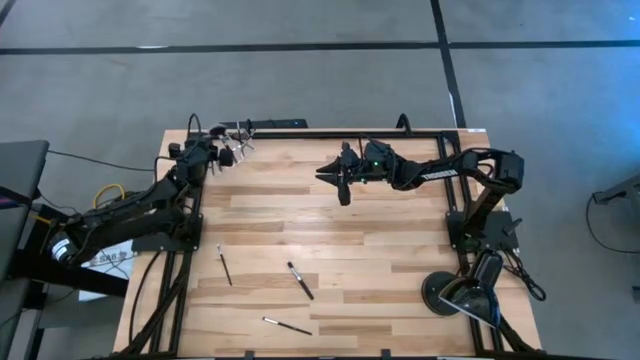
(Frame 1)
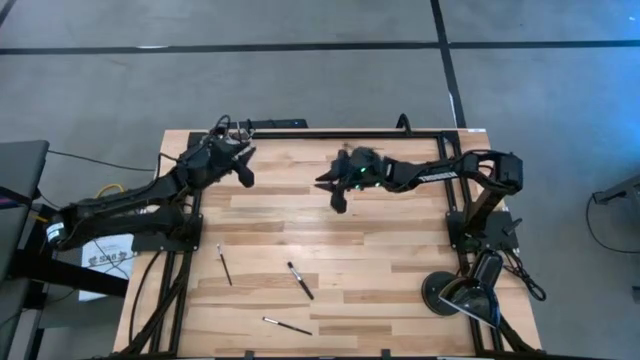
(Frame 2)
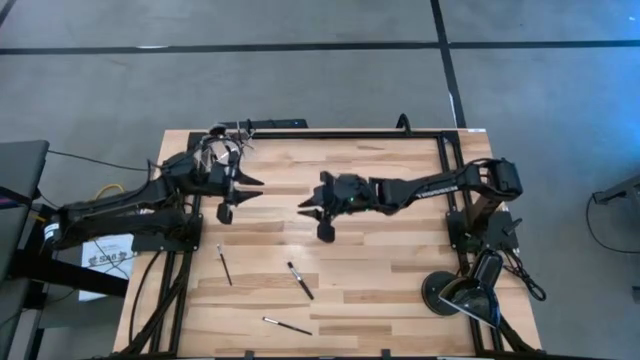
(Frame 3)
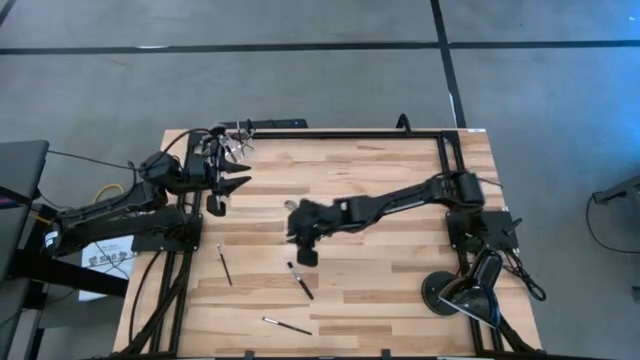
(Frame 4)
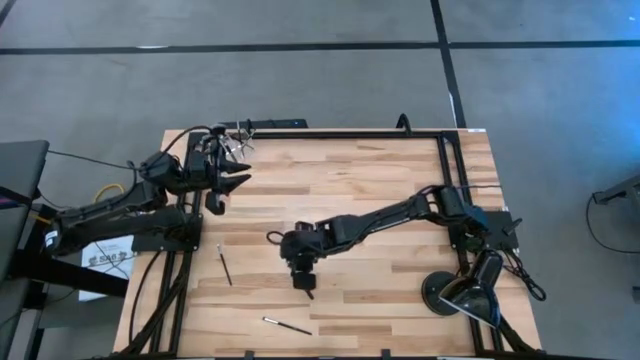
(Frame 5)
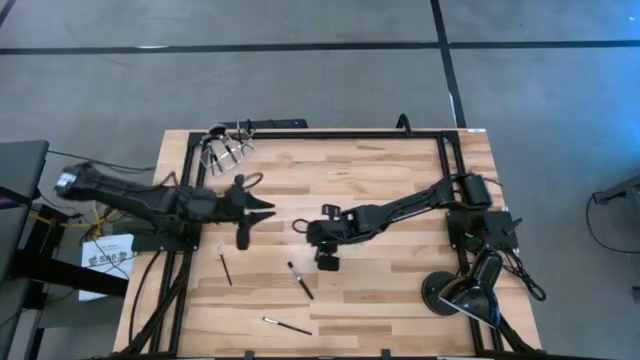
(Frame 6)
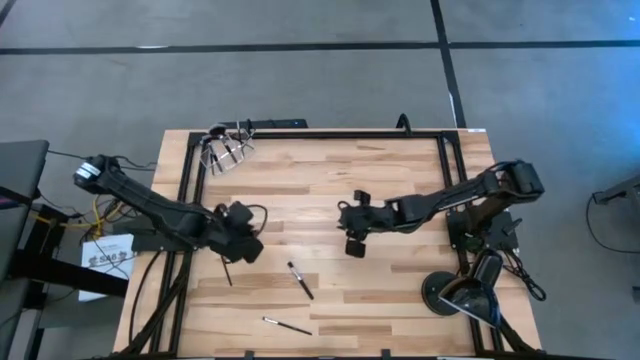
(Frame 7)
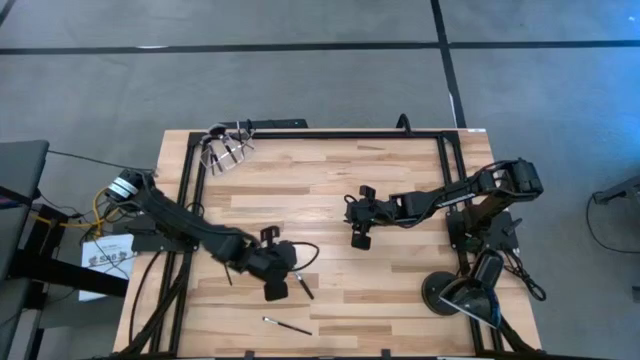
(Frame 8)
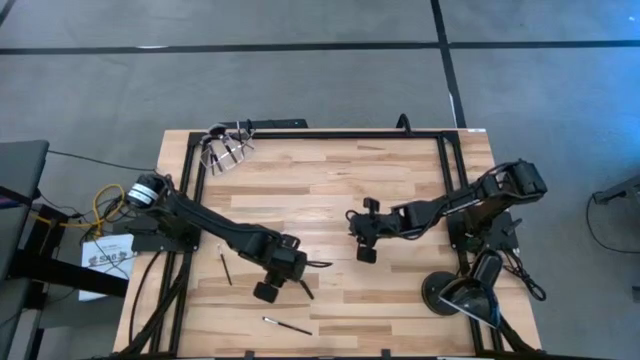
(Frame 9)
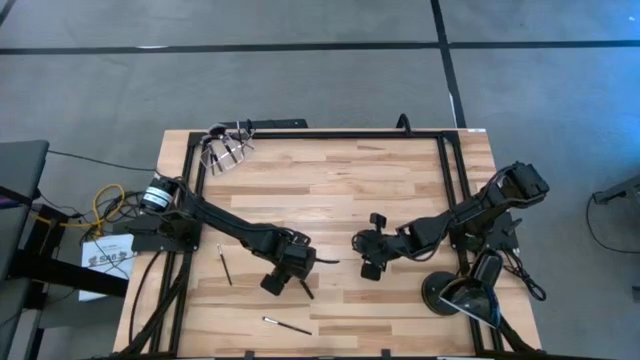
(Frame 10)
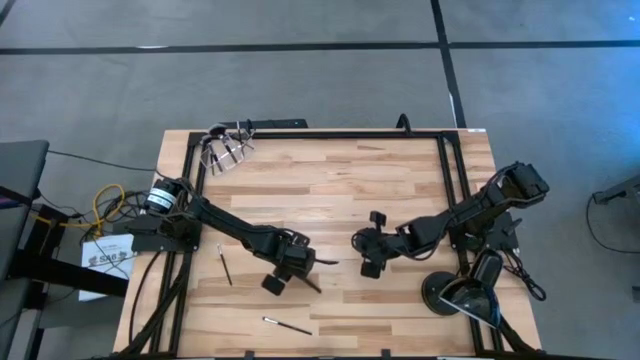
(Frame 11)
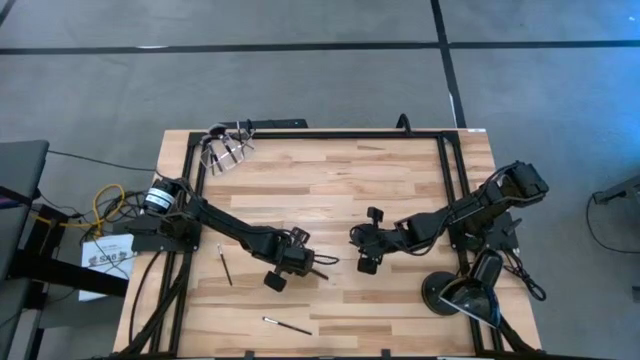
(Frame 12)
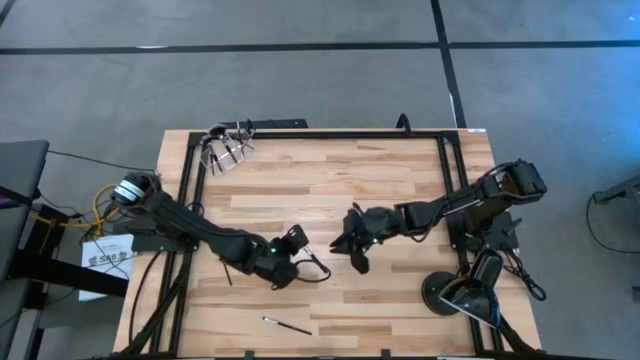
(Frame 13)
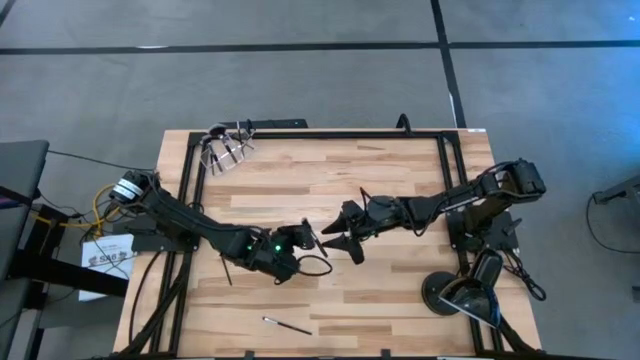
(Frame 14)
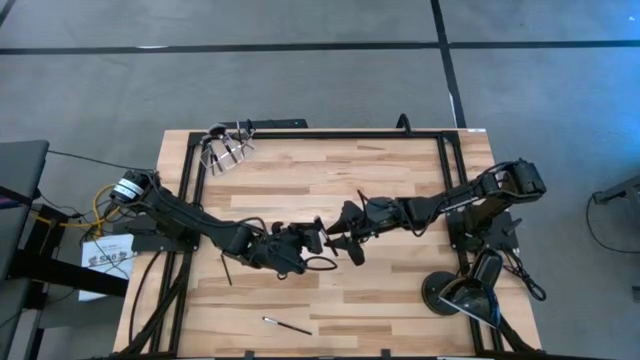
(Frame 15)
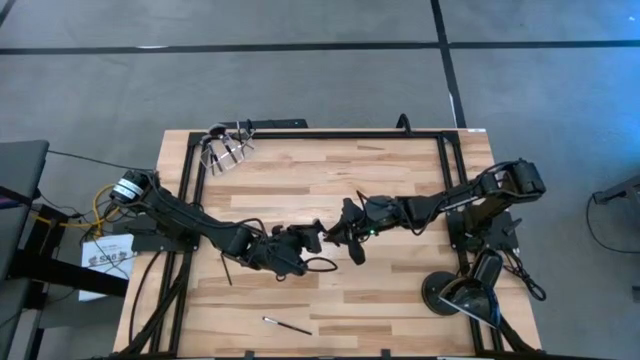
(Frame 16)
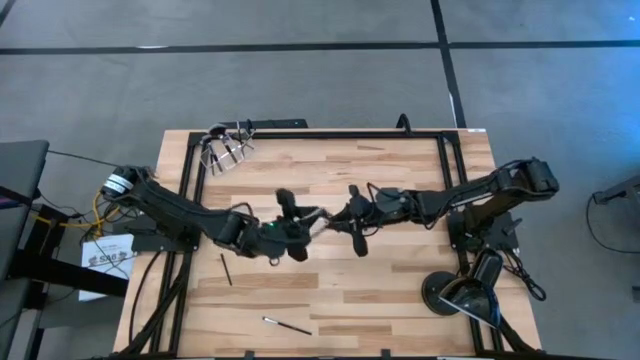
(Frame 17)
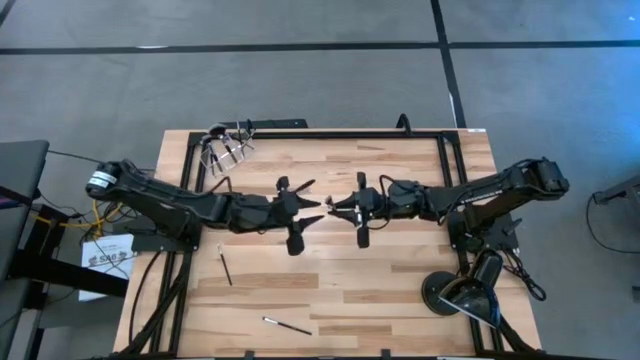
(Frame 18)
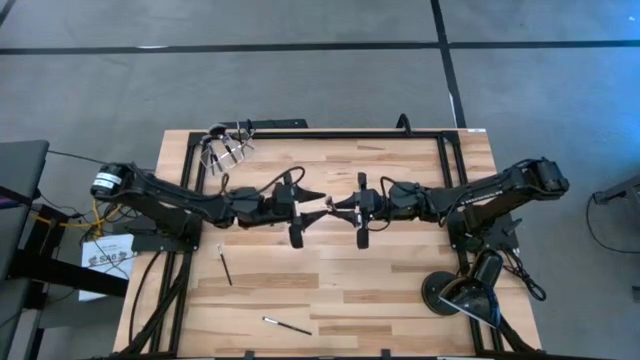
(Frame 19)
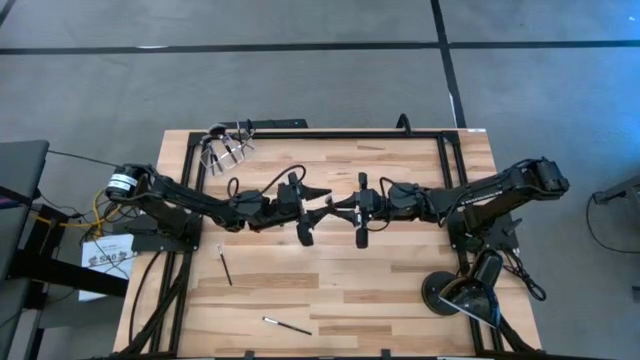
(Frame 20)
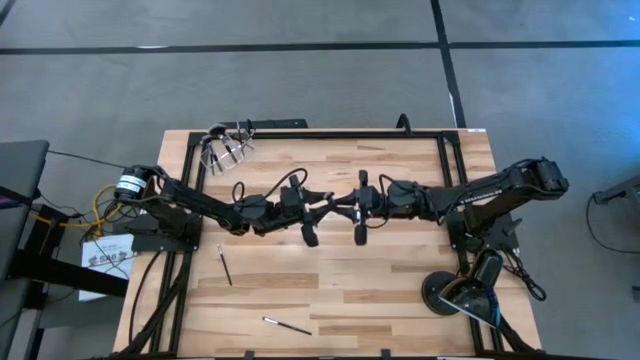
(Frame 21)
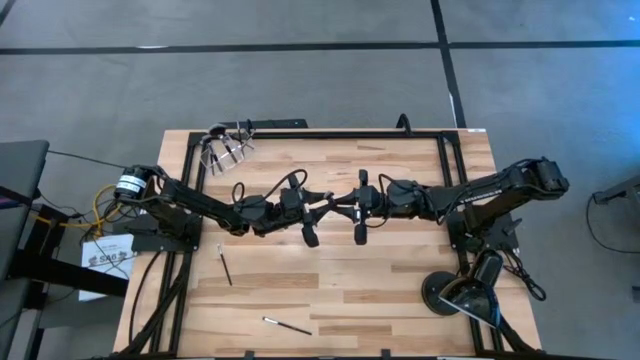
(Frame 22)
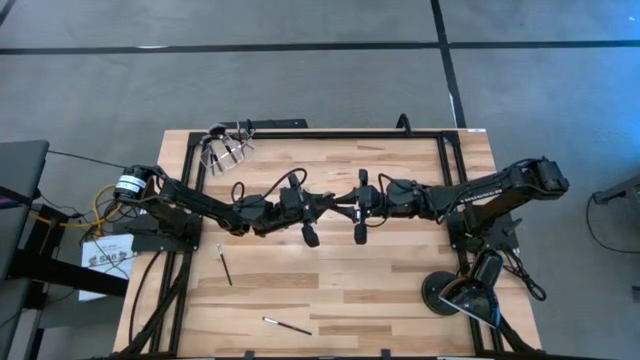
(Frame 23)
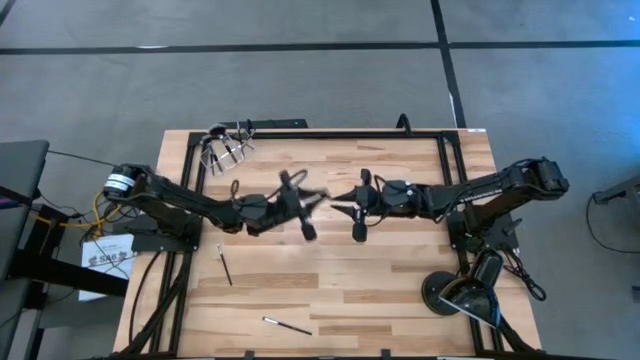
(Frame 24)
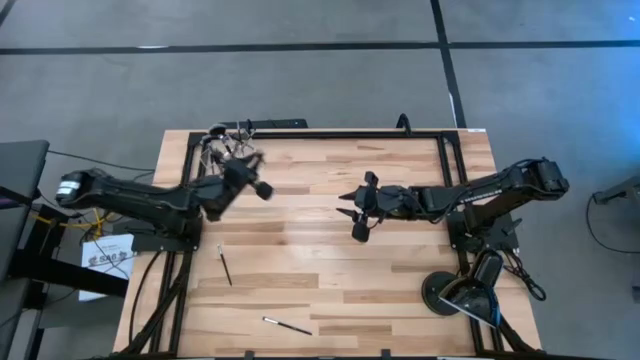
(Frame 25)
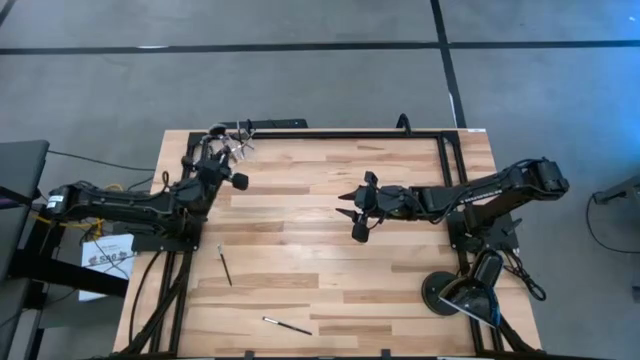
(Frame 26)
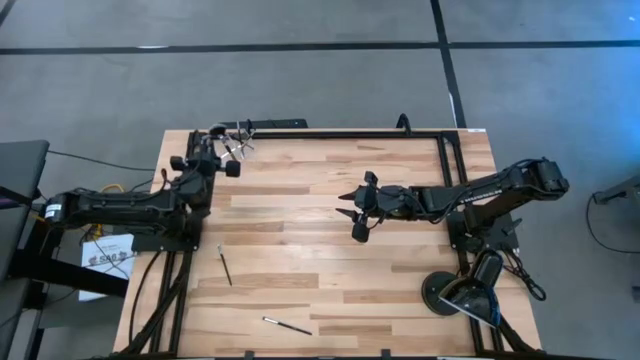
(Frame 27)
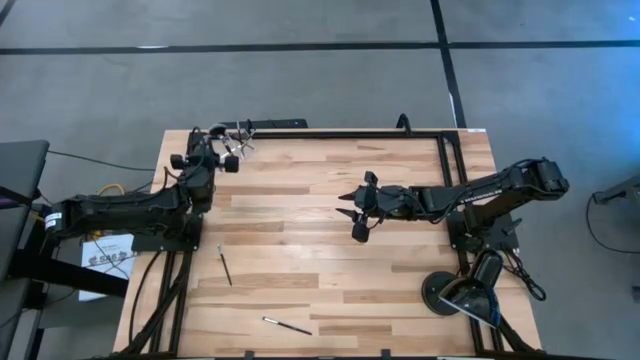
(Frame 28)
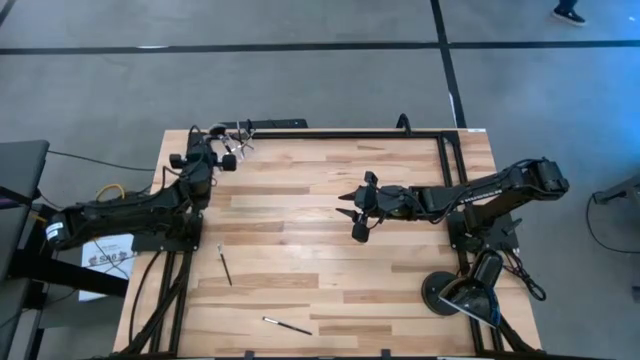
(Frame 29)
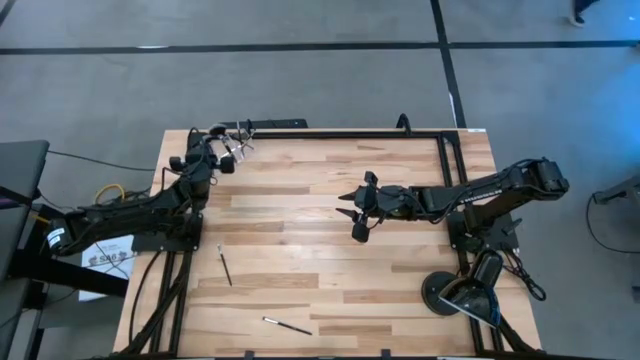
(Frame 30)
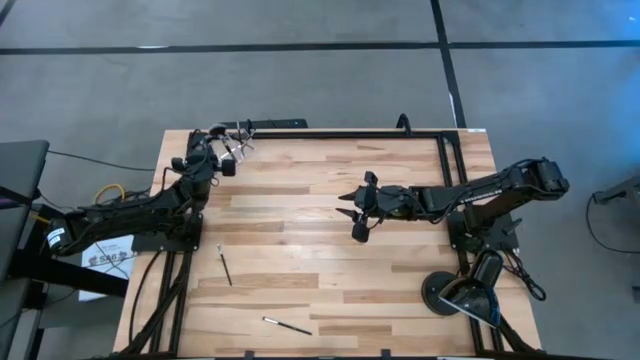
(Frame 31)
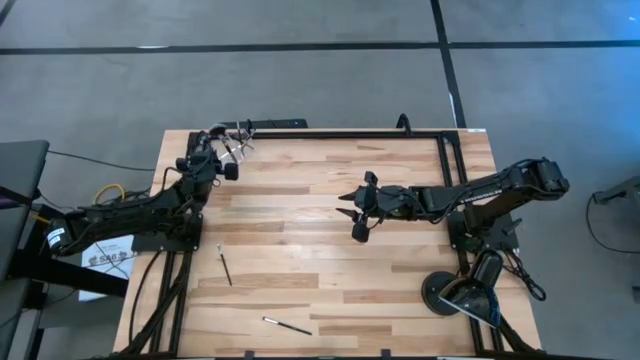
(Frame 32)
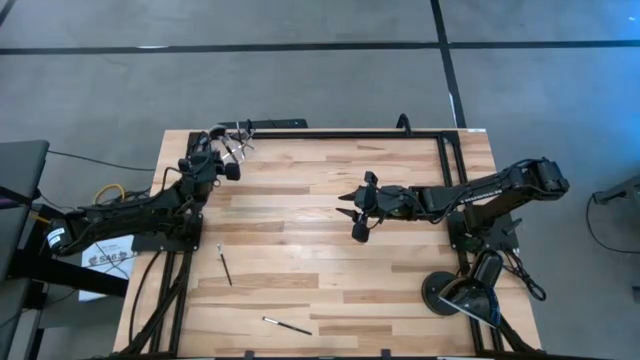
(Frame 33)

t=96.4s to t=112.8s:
Task: Put items in baskets/containers
Put the blush brush into the transparent bin

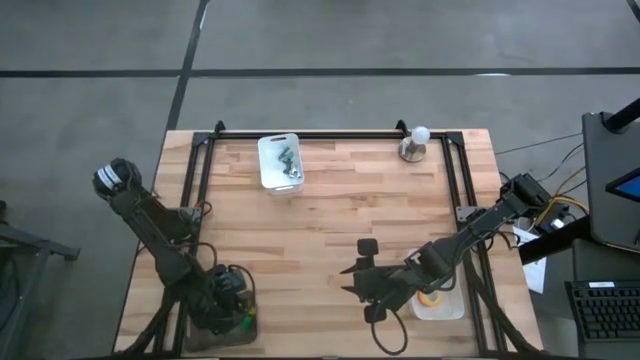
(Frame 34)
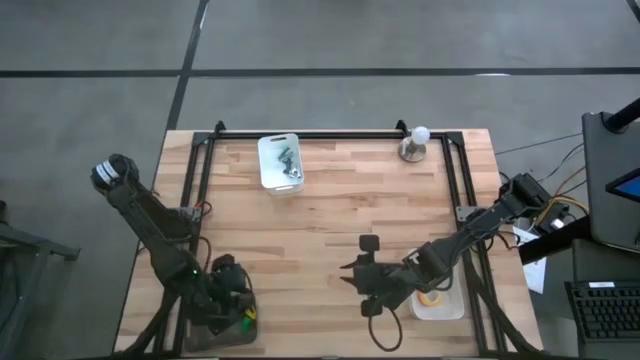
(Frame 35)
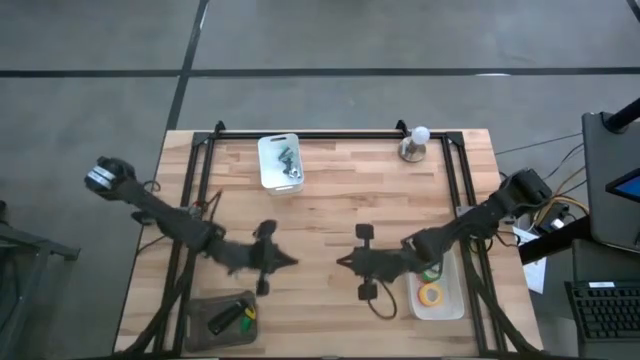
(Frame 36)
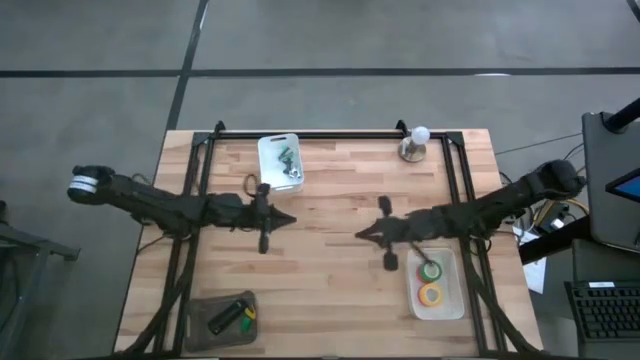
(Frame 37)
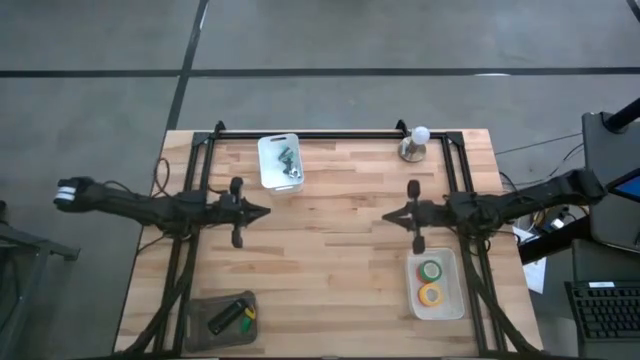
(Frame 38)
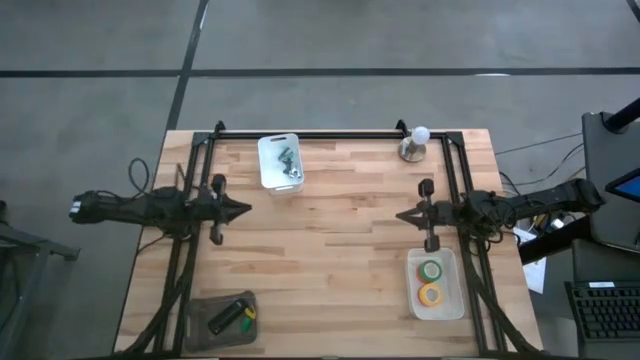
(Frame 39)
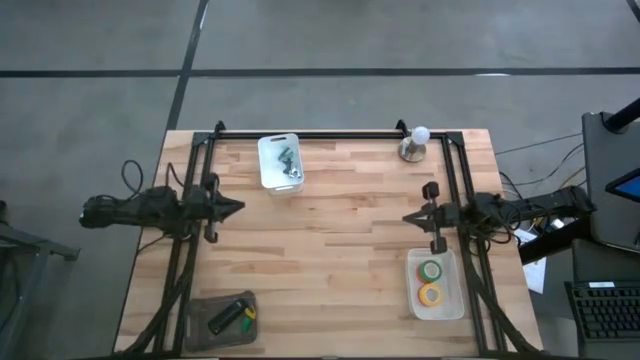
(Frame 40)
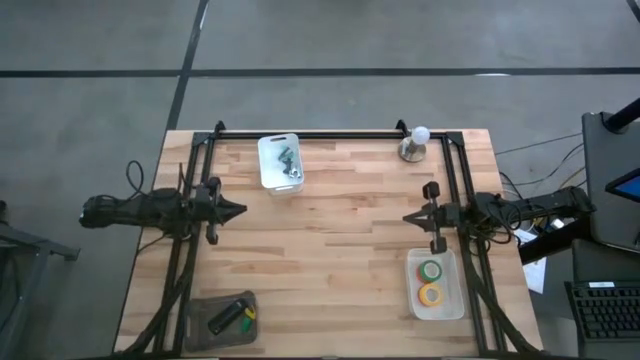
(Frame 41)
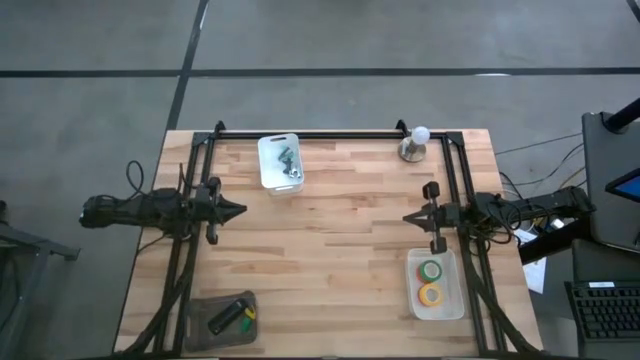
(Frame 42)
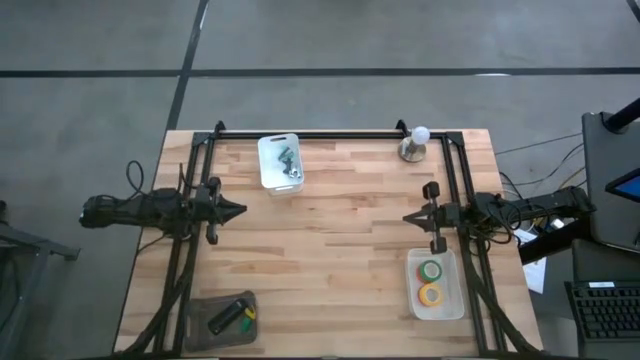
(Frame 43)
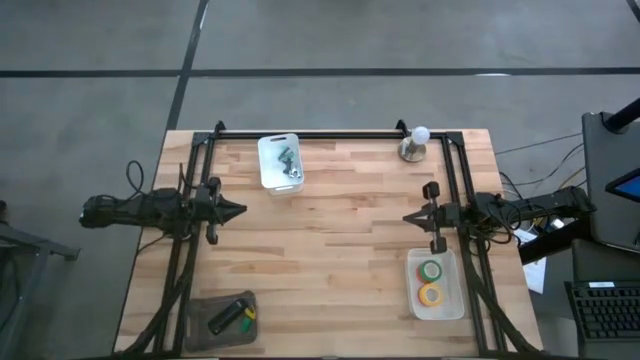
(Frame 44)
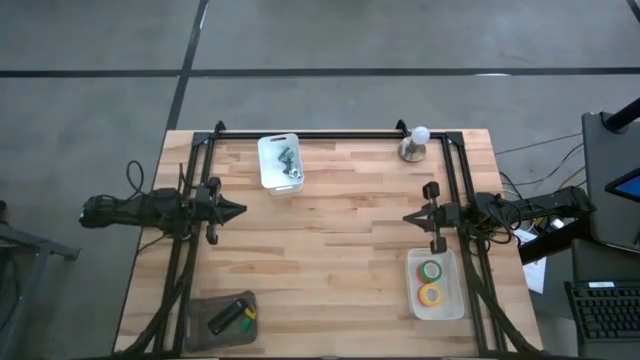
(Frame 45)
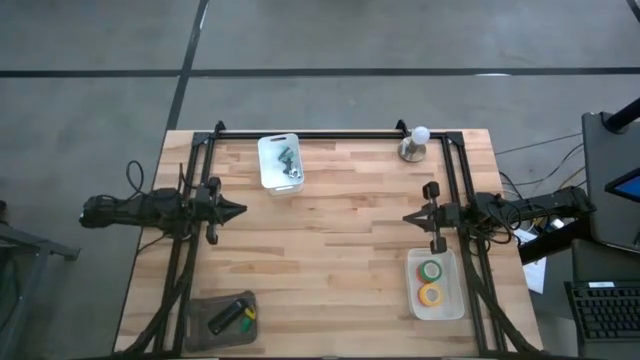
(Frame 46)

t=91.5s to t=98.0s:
Task: Pick and place Stapler, Stapler remover, tape
Return to Home Position
